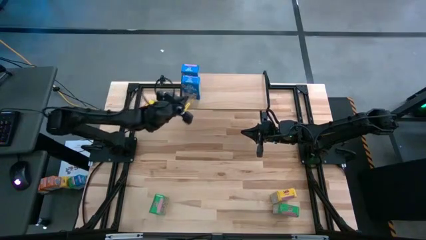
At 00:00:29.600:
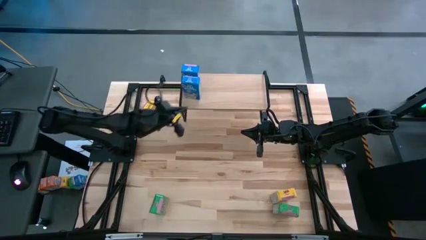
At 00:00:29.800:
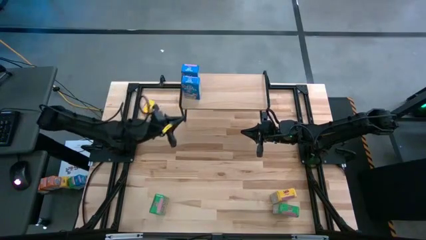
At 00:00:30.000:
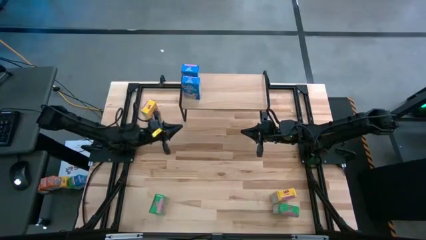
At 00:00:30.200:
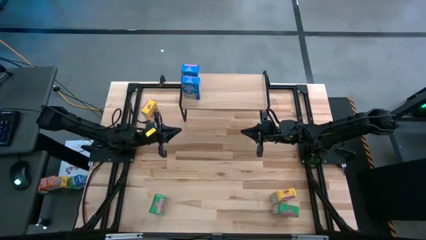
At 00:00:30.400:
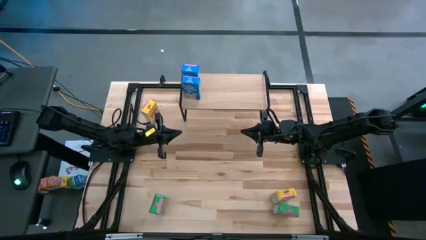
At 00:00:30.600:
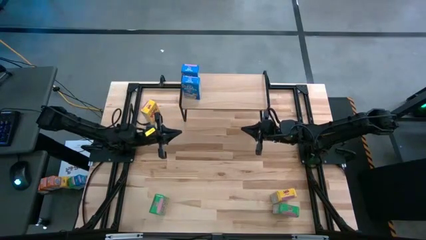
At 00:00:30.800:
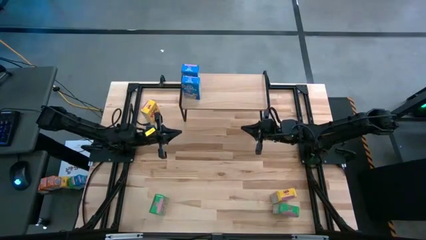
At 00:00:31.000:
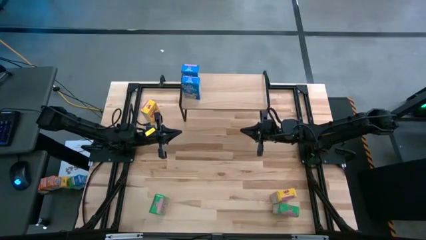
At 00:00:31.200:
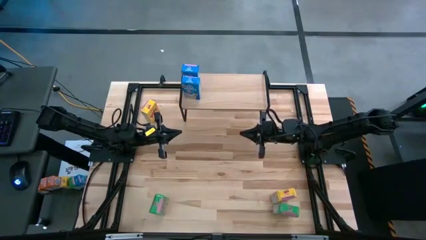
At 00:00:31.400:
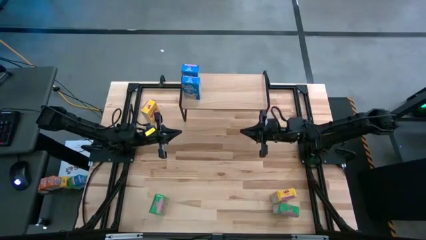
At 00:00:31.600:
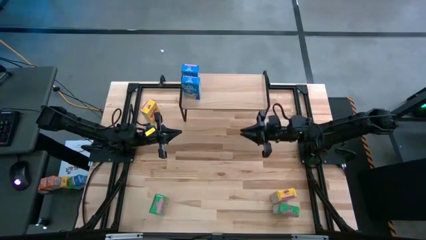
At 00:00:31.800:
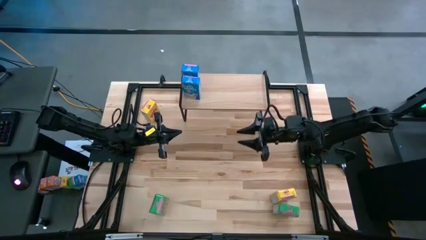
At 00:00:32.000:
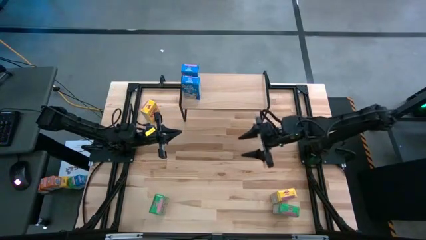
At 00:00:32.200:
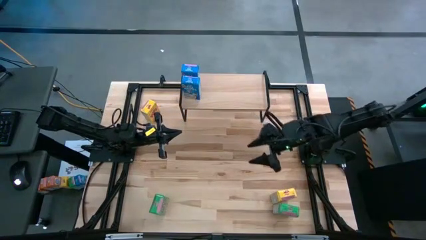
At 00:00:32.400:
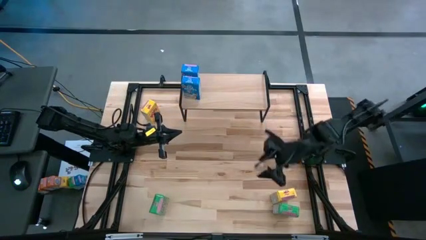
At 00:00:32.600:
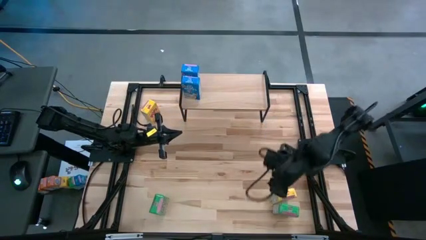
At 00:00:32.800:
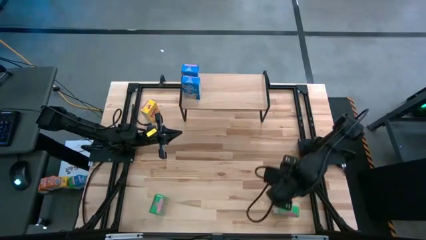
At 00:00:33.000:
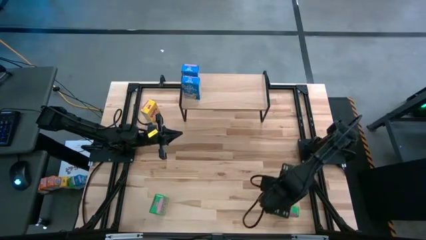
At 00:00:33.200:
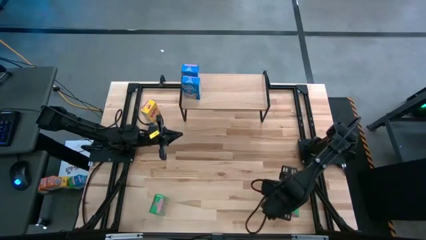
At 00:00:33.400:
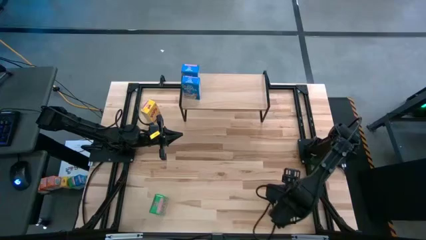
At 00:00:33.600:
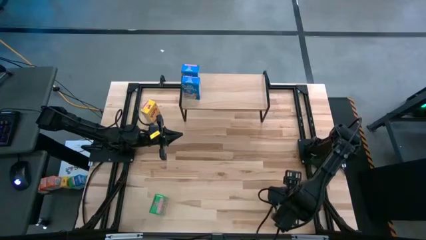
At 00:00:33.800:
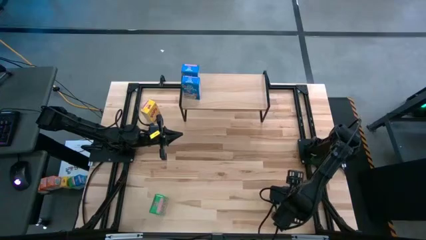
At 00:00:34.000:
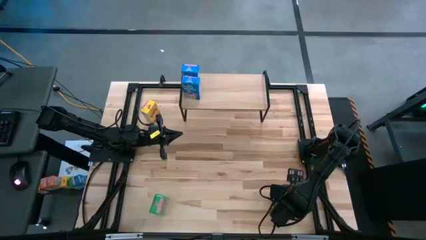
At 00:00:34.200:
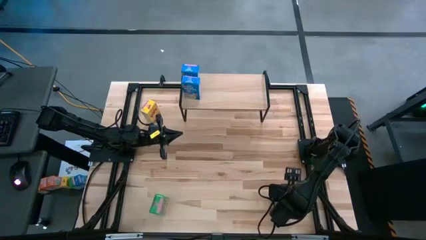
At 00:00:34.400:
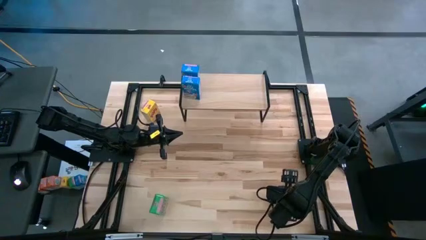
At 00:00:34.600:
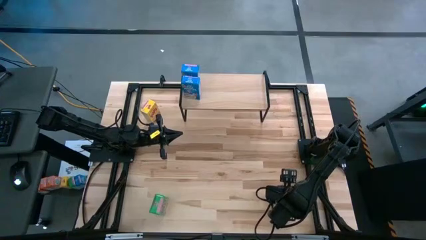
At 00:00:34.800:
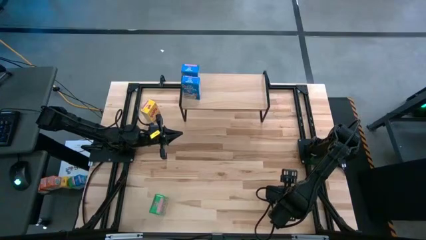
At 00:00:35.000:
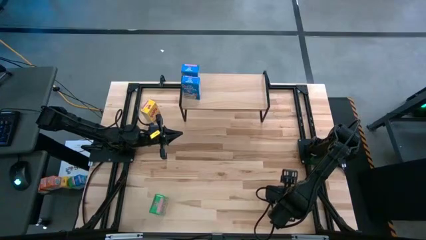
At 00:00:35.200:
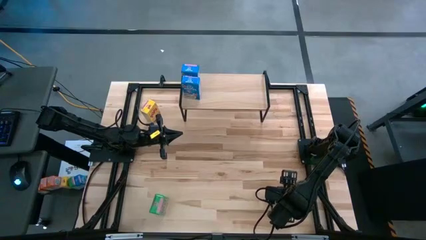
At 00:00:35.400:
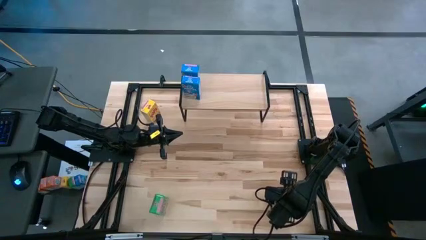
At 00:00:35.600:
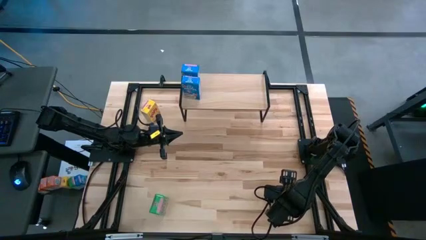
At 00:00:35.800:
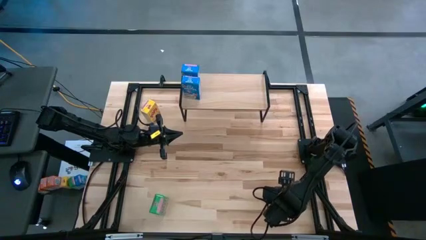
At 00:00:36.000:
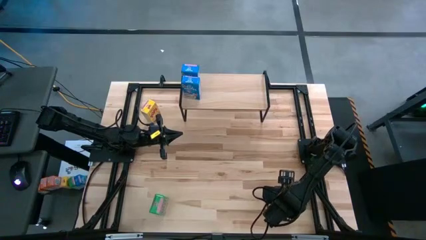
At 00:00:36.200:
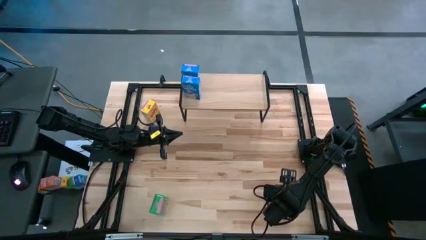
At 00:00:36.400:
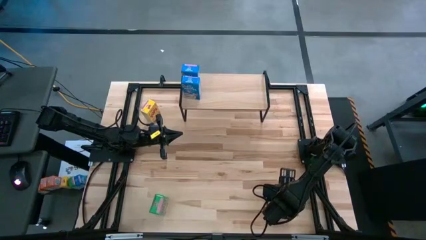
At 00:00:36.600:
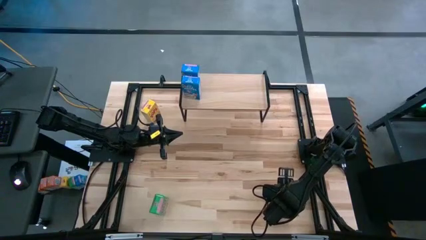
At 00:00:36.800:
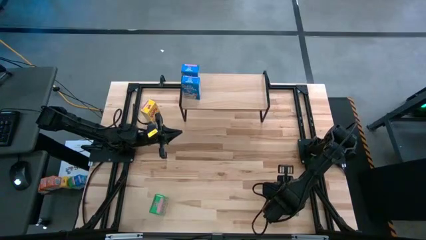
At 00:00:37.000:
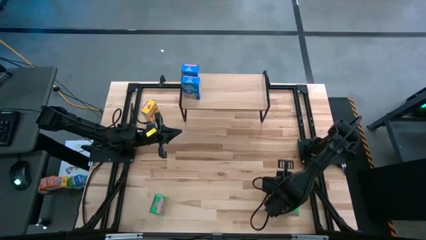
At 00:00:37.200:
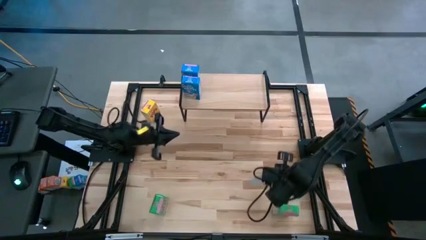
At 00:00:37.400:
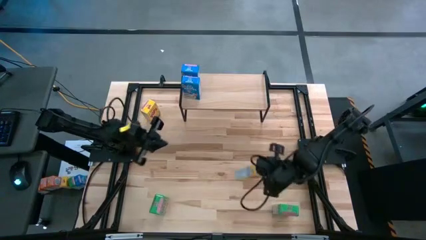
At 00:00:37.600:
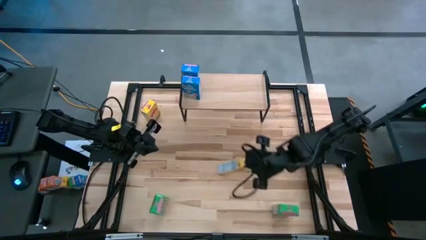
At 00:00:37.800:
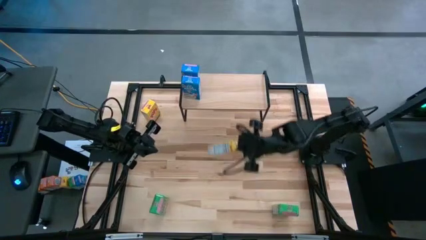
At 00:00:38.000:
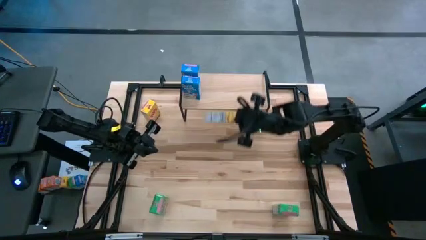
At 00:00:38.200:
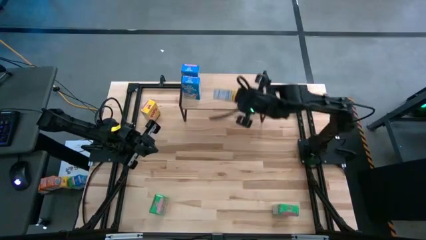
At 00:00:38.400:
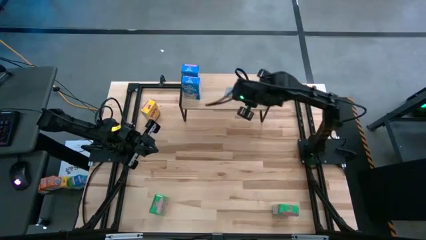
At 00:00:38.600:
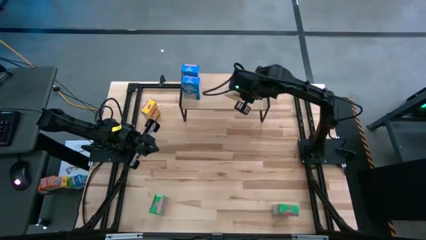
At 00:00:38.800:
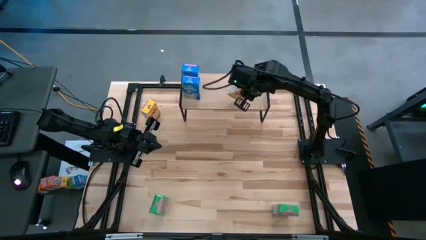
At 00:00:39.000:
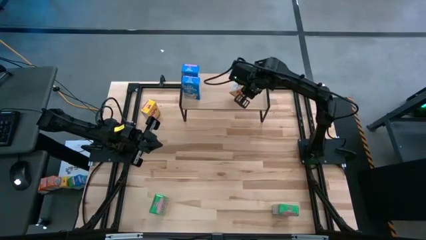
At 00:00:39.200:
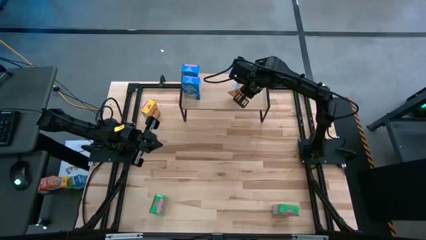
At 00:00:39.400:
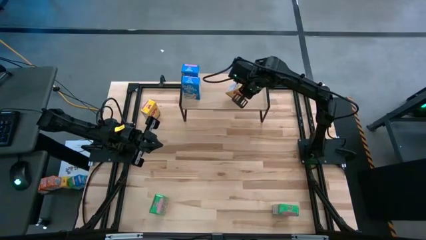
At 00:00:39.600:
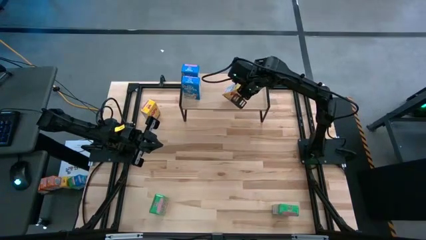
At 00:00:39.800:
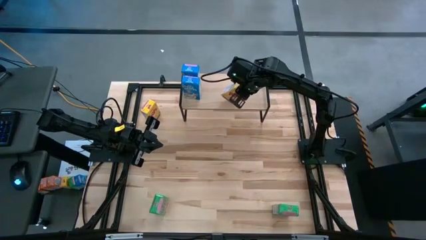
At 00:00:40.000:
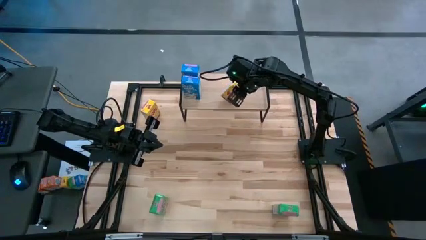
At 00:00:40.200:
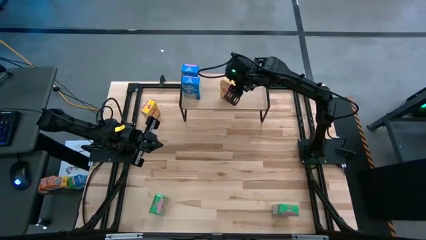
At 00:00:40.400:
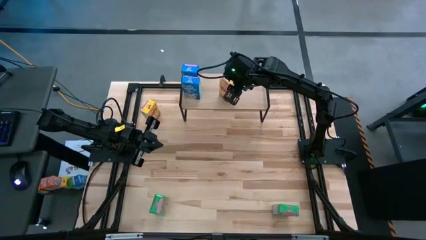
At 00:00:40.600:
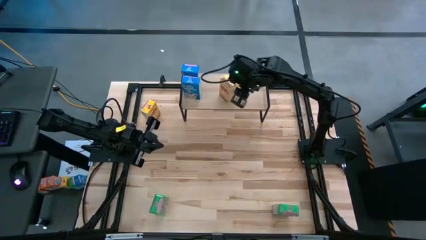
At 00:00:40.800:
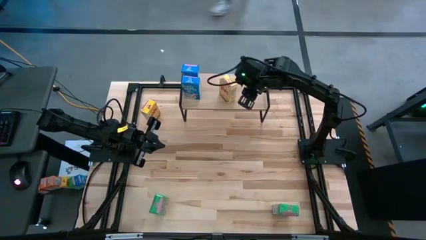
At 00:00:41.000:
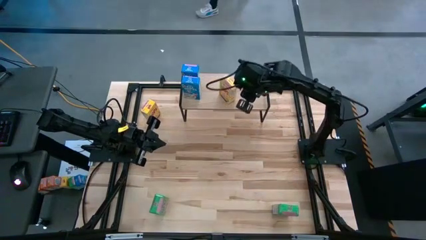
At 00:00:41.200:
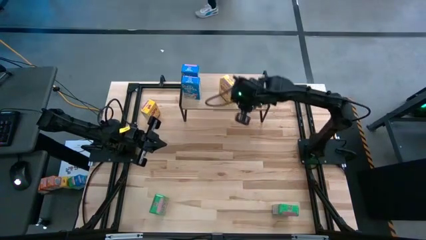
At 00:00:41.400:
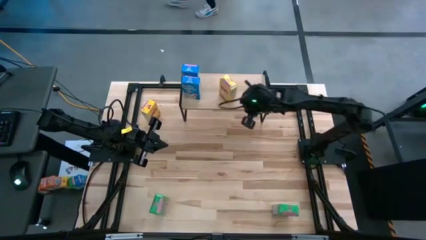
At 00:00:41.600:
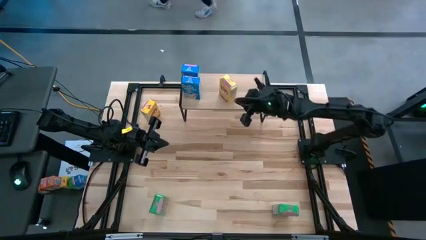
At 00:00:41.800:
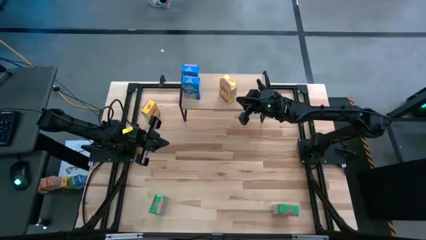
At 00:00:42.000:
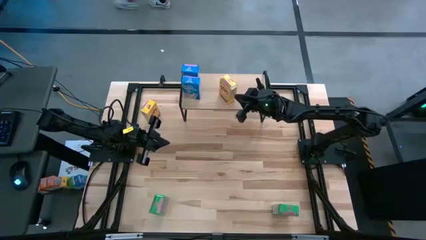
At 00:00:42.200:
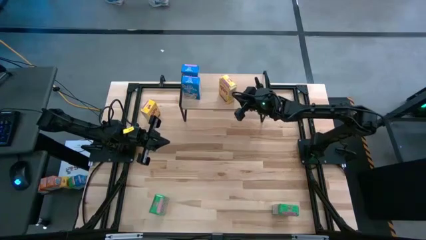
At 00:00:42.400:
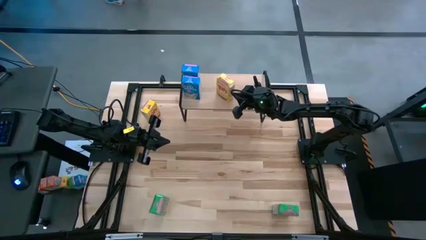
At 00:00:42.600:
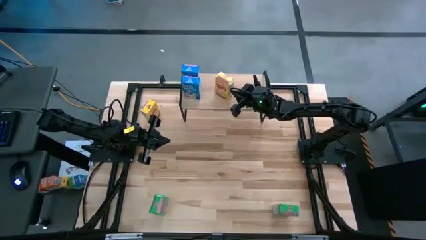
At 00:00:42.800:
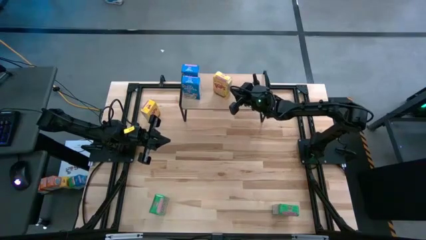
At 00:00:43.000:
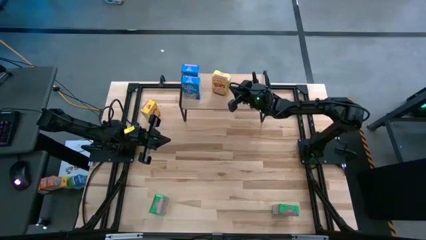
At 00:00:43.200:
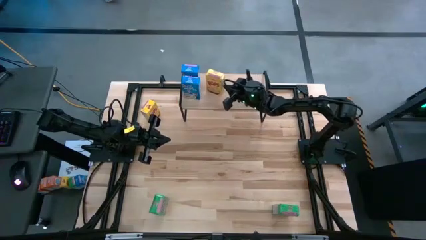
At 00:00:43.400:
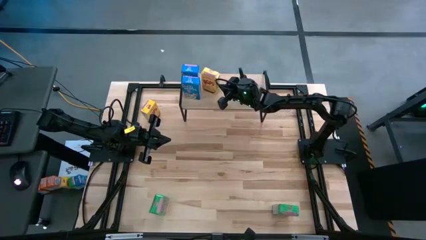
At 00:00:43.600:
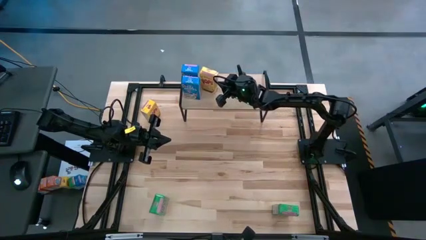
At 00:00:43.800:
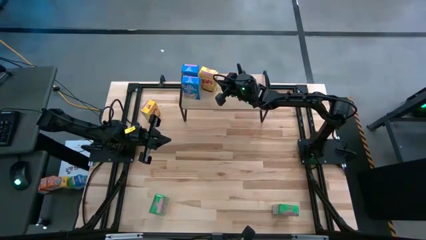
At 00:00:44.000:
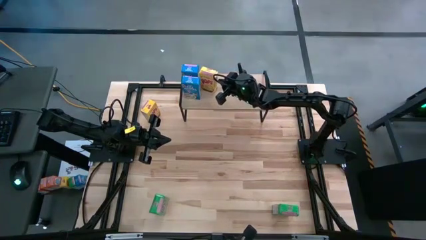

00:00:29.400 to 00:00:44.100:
Task: Stack cereal on shelf
Put the bottom yellow cereal box on the shelf
